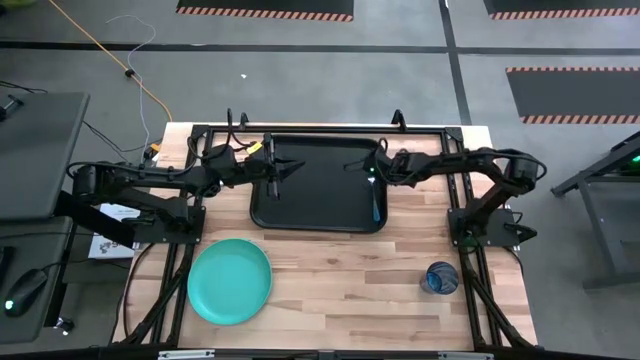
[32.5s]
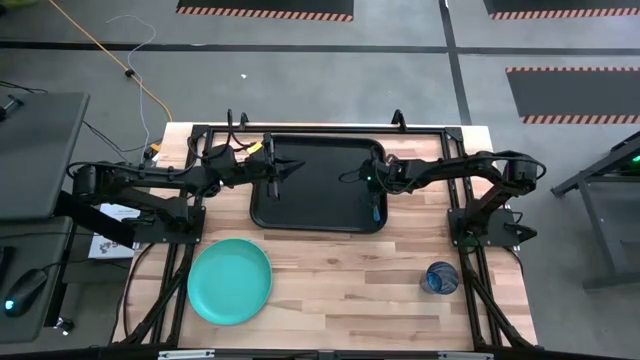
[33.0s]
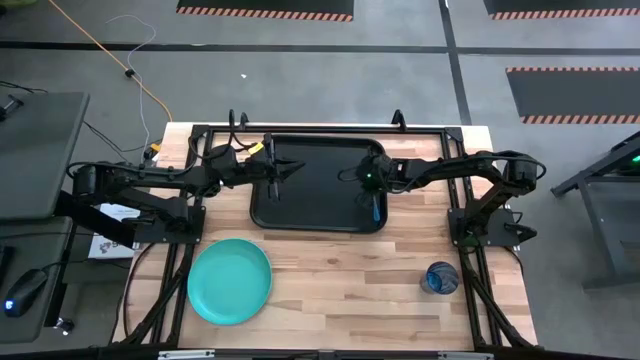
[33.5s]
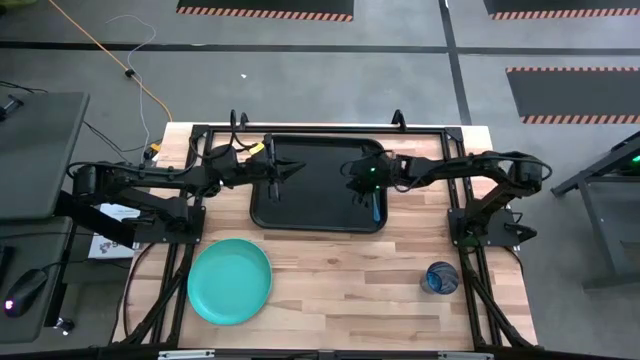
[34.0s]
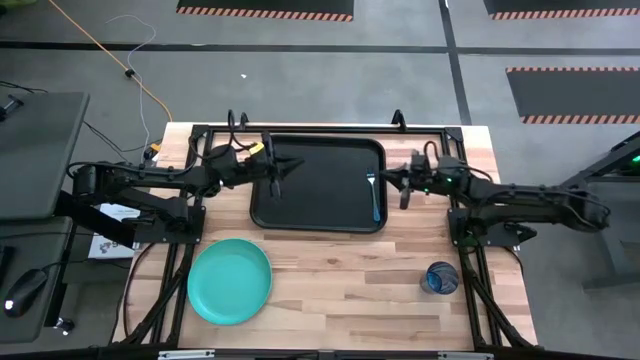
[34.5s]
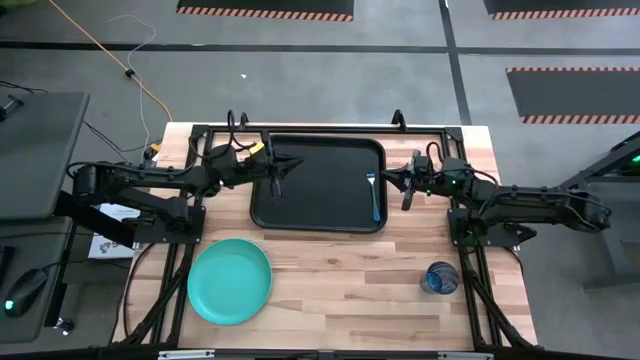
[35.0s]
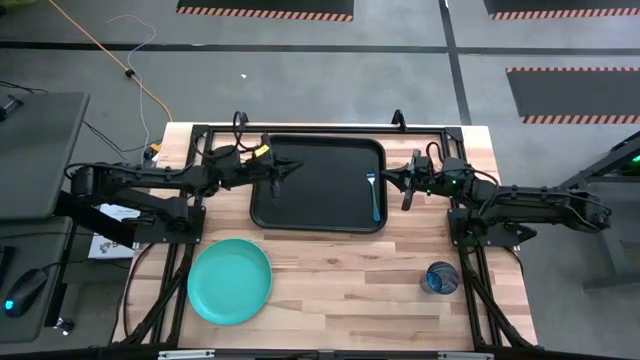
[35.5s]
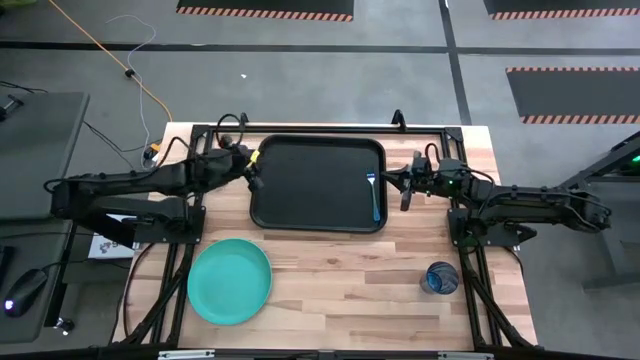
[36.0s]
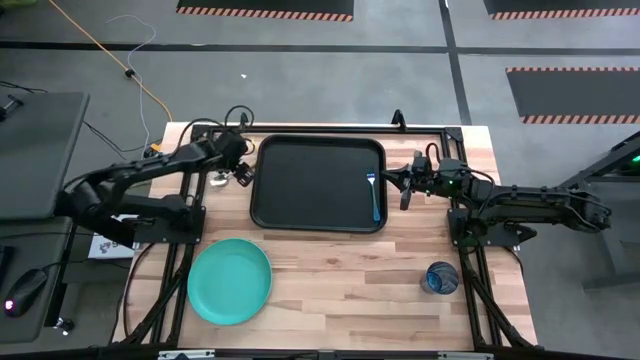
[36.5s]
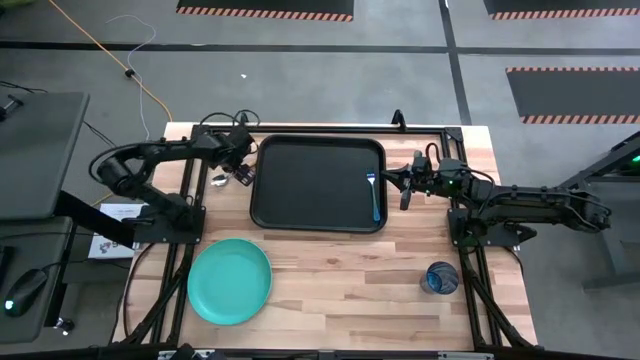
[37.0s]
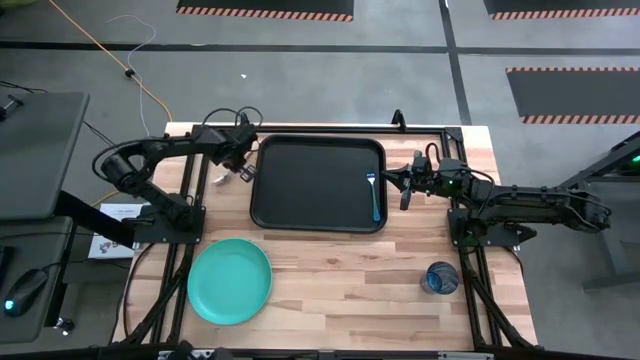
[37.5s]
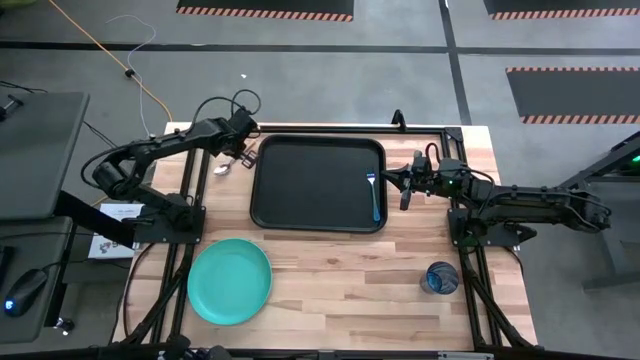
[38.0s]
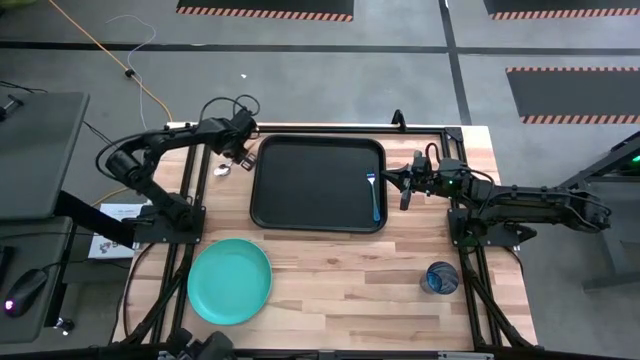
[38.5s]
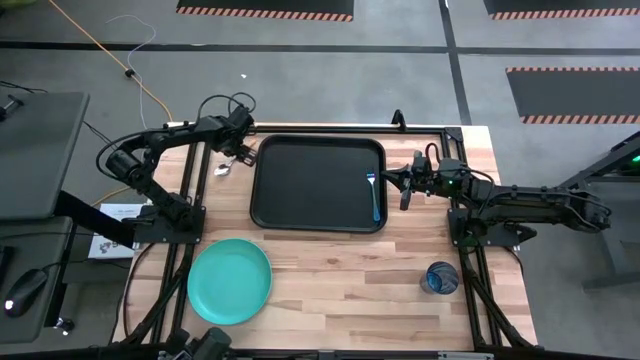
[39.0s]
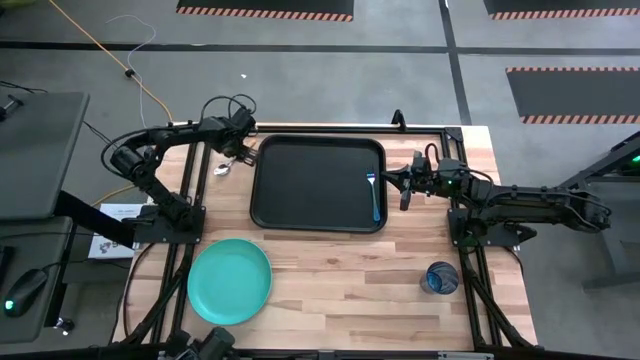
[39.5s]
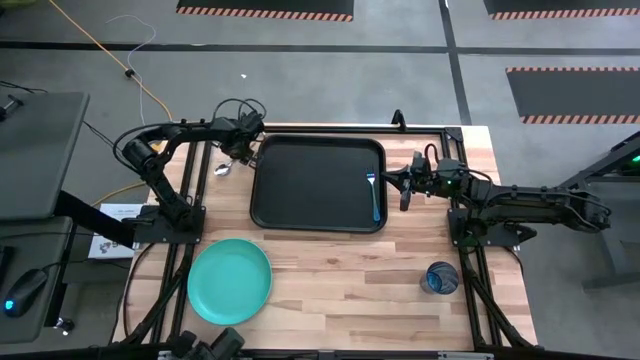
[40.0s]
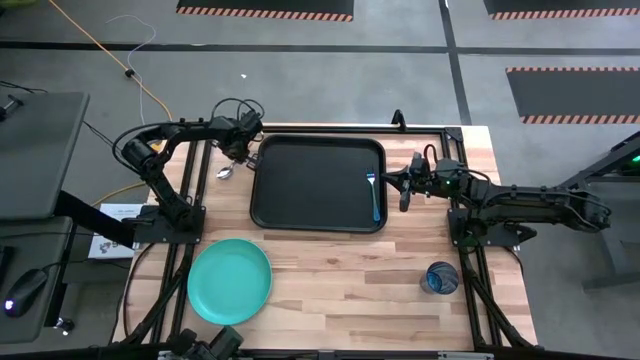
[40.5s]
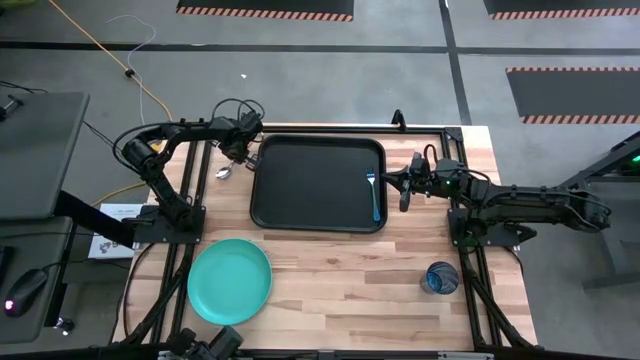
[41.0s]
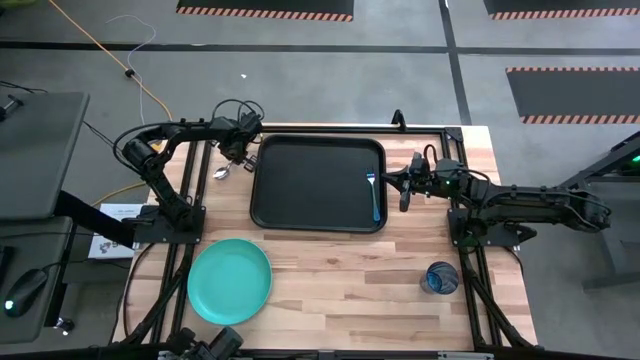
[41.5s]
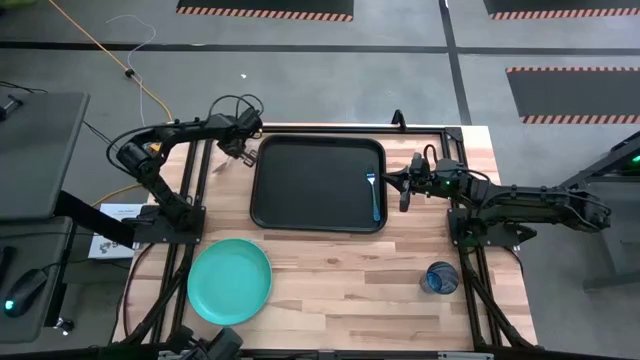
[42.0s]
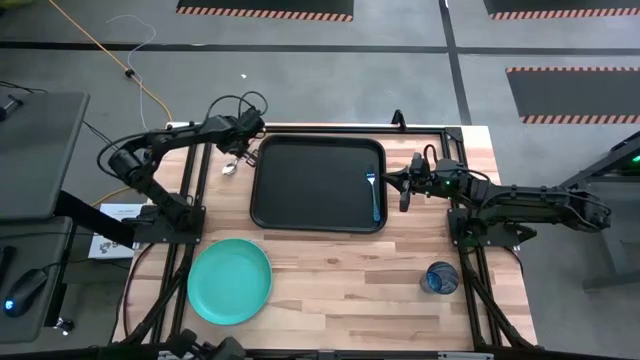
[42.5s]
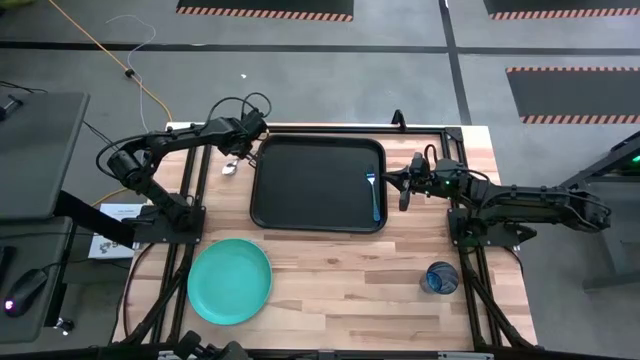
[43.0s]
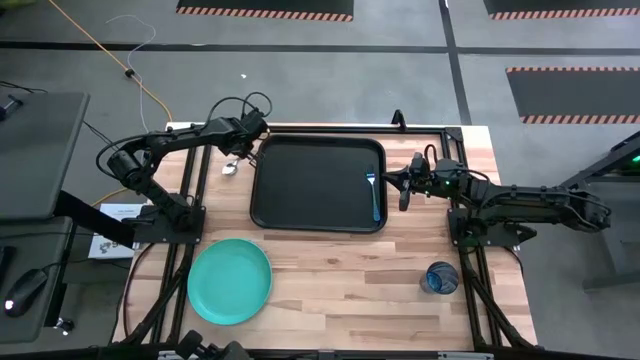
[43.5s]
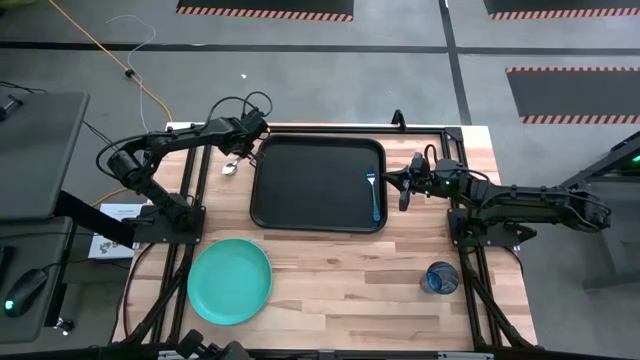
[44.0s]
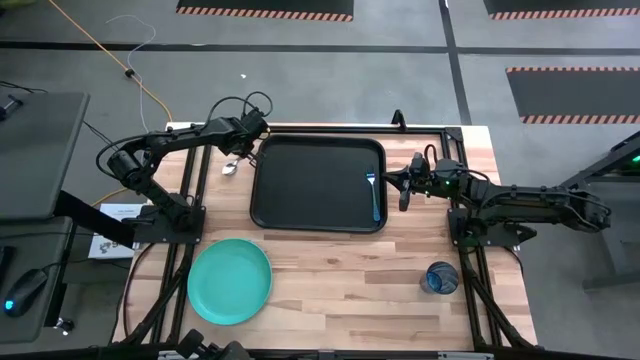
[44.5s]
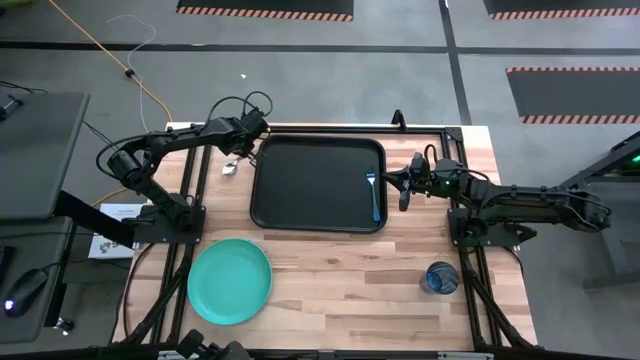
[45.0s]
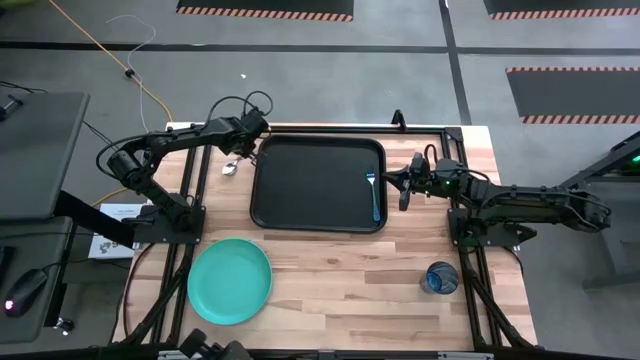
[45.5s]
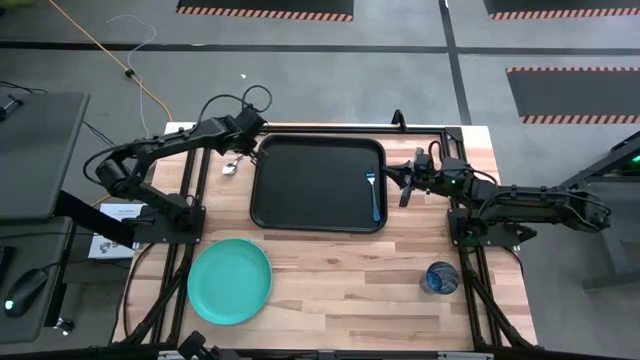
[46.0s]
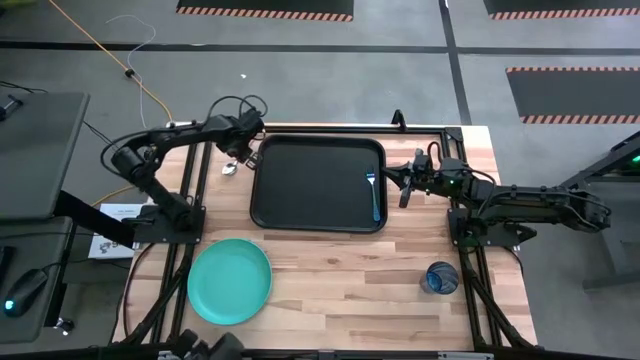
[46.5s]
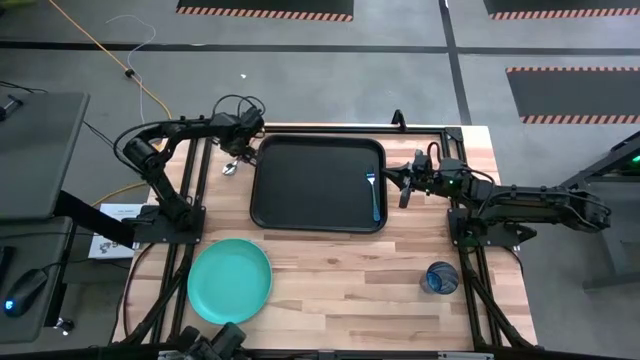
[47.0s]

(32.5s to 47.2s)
Task: Pick and place plate/cup/fork/spoon on tray
Put the yellow spoon on the black tray to the left side of the blue fork

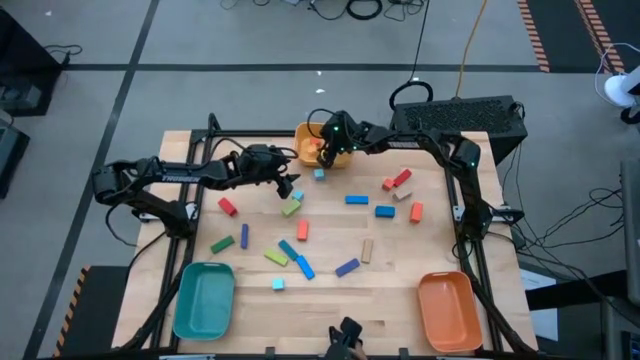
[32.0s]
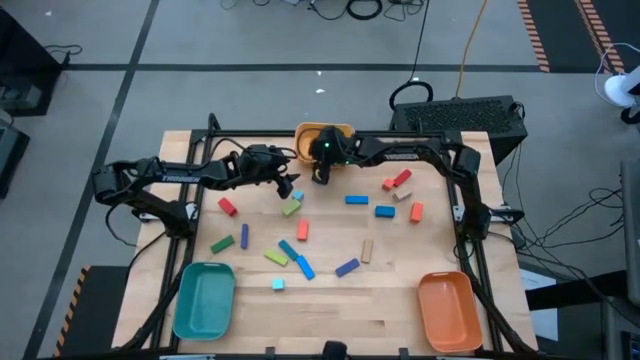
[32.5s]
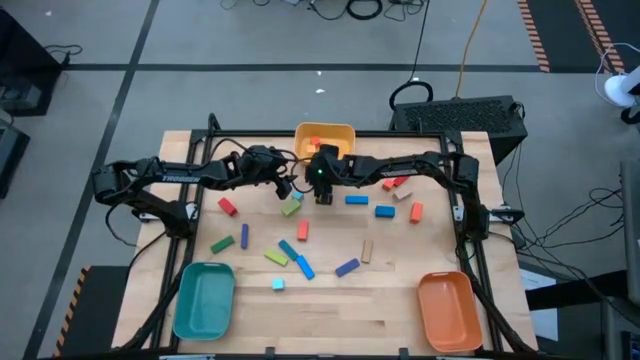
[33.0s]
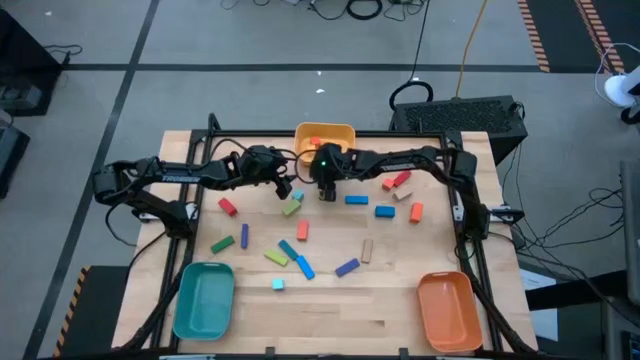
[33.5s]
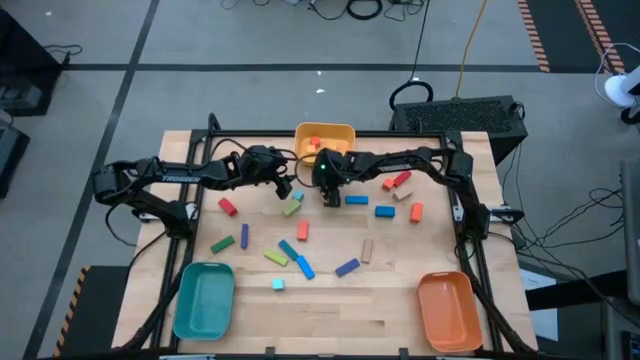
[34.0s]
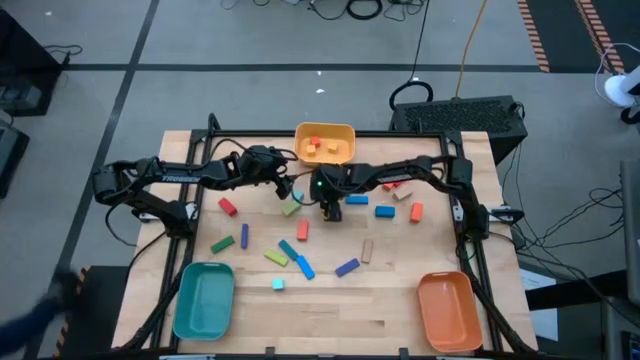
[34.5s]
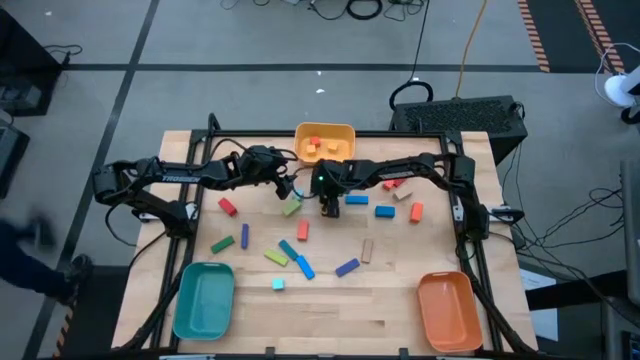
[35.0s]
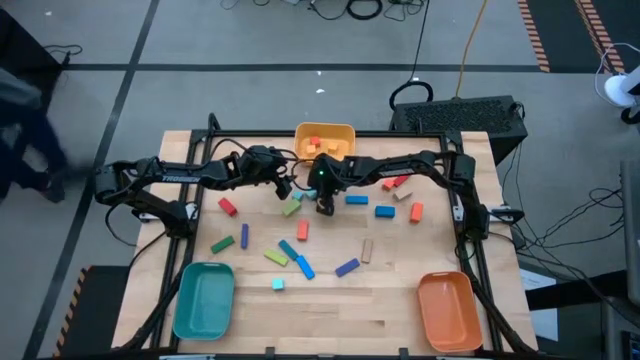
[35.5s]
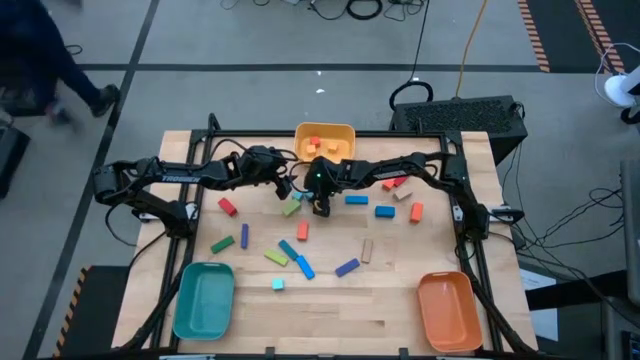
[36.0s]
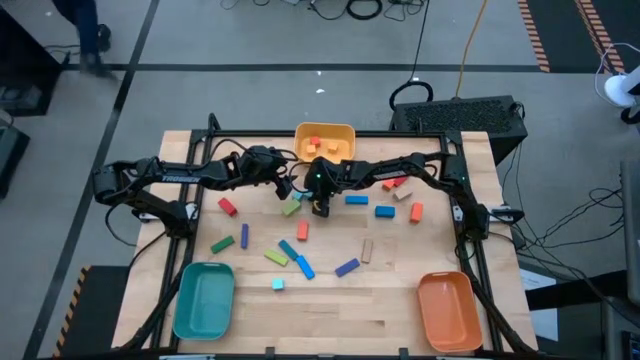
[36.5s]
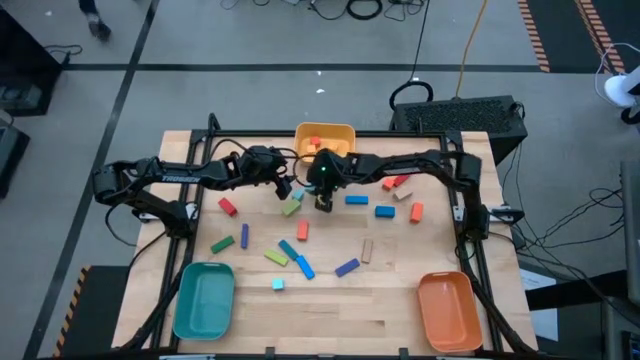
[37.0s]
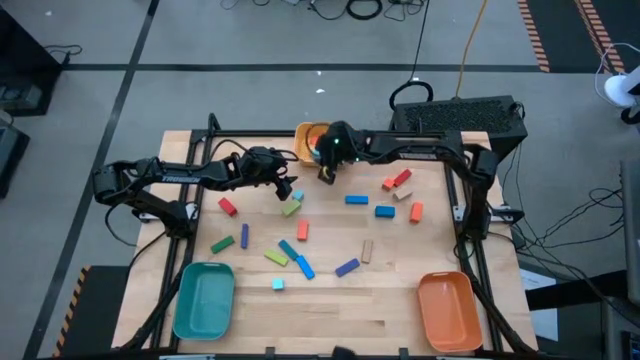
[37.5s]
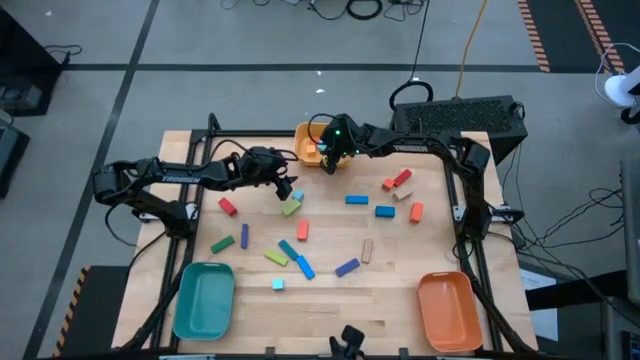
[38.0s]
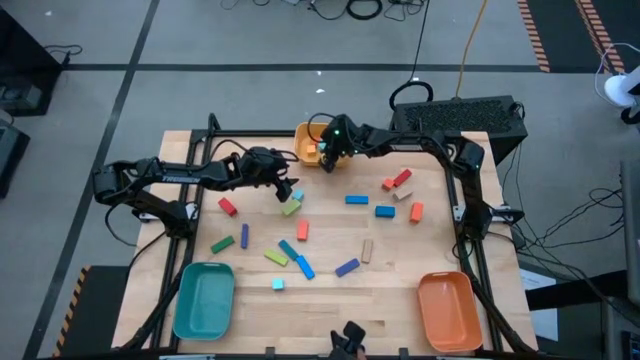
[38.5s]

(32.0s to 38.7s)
Task: Sort blocks by size
Put the top blue square block into the yellow bin
